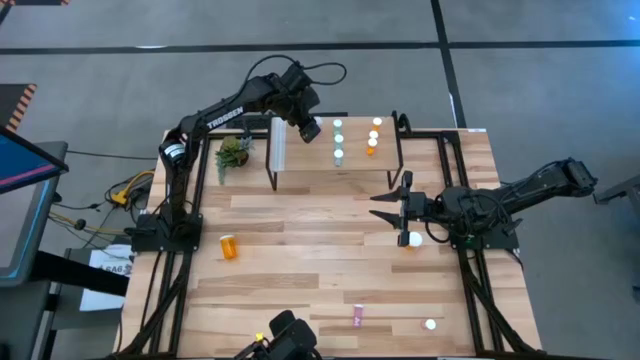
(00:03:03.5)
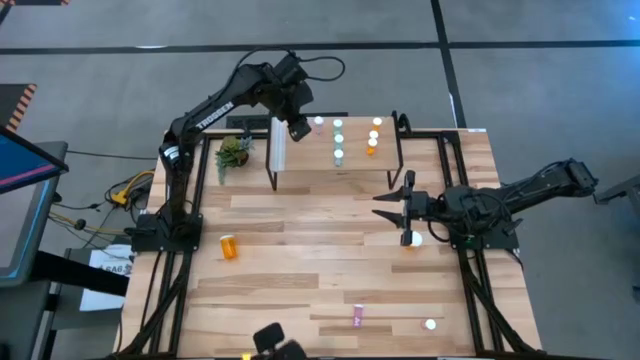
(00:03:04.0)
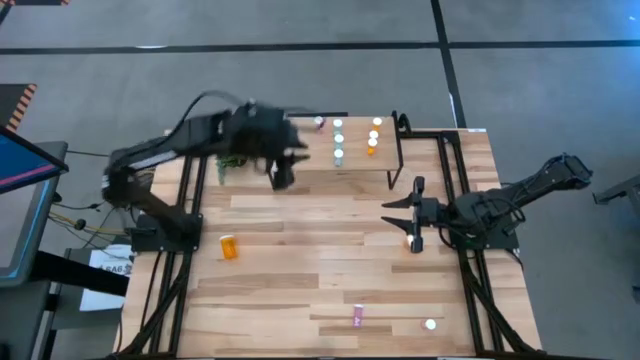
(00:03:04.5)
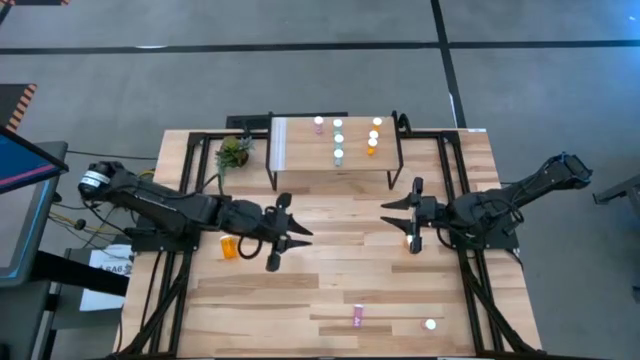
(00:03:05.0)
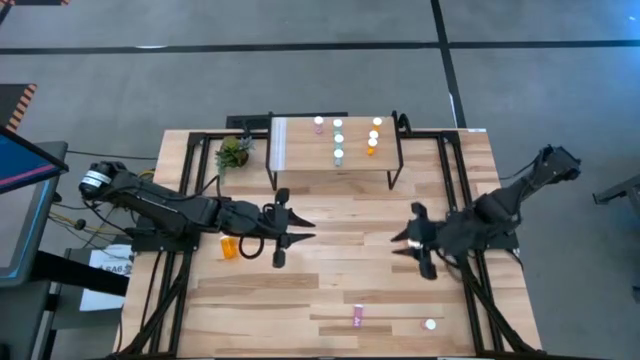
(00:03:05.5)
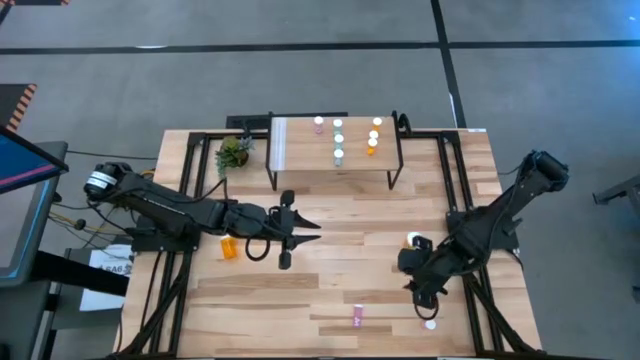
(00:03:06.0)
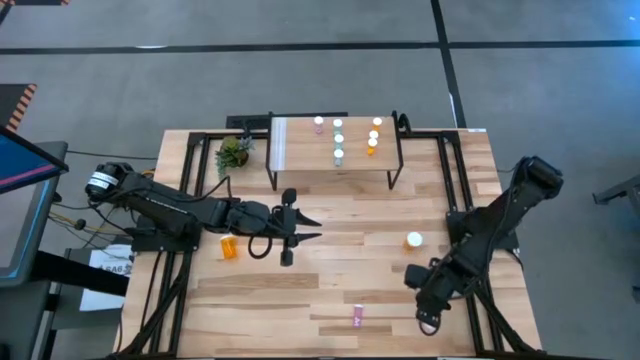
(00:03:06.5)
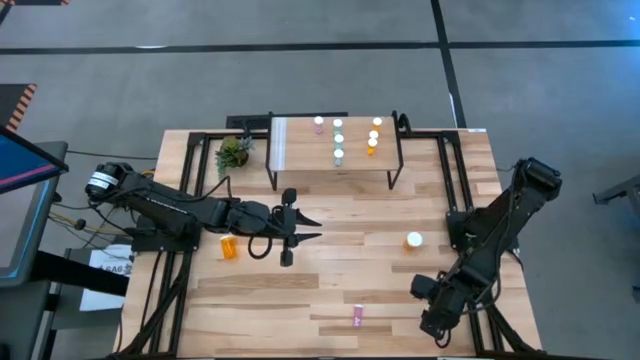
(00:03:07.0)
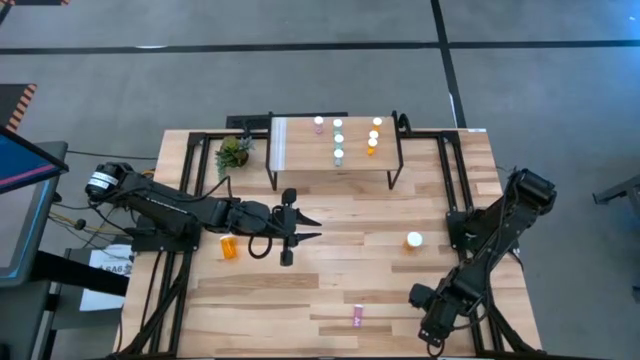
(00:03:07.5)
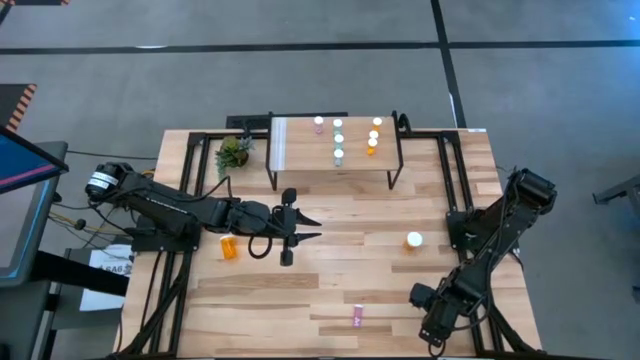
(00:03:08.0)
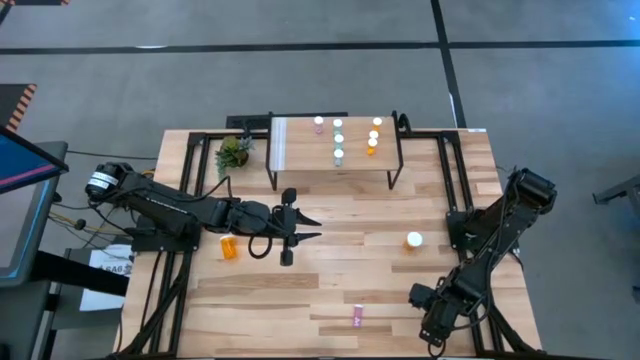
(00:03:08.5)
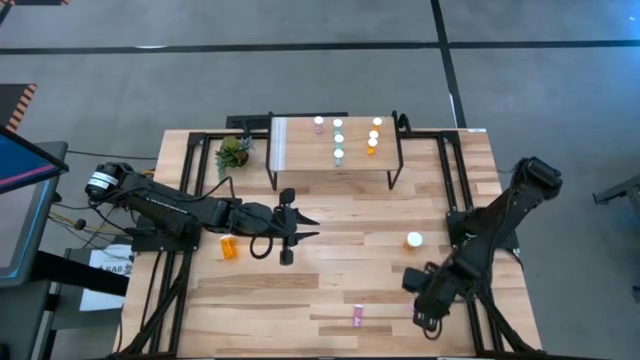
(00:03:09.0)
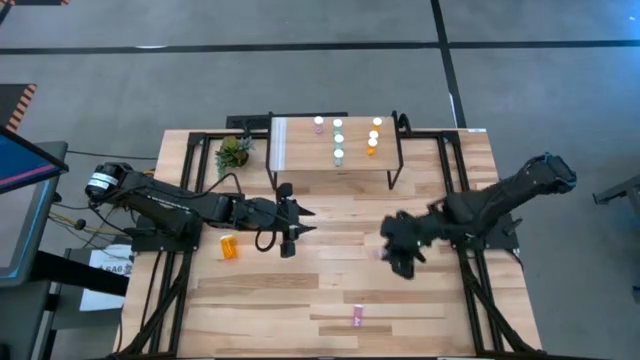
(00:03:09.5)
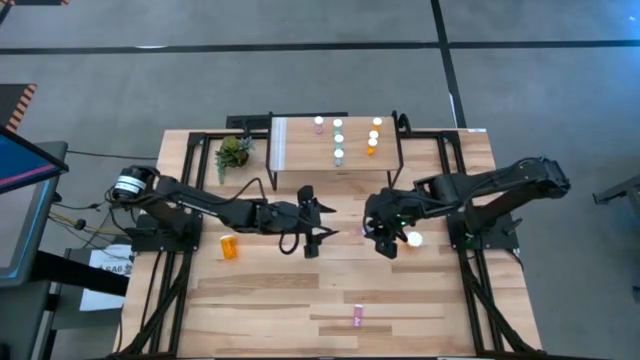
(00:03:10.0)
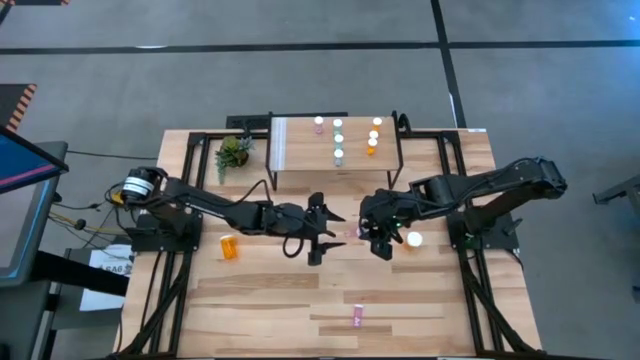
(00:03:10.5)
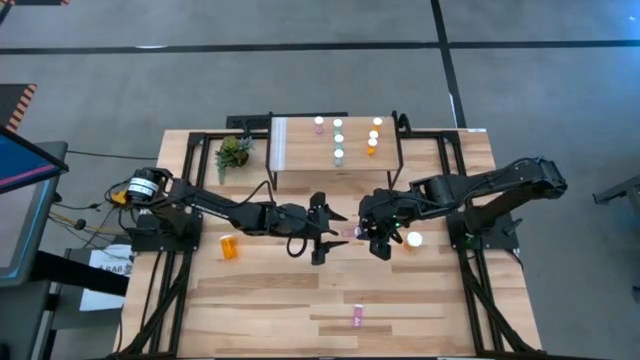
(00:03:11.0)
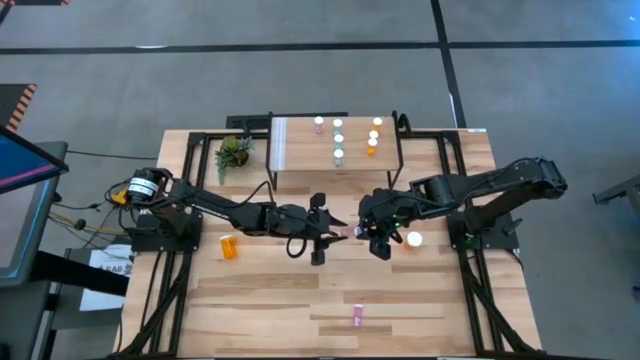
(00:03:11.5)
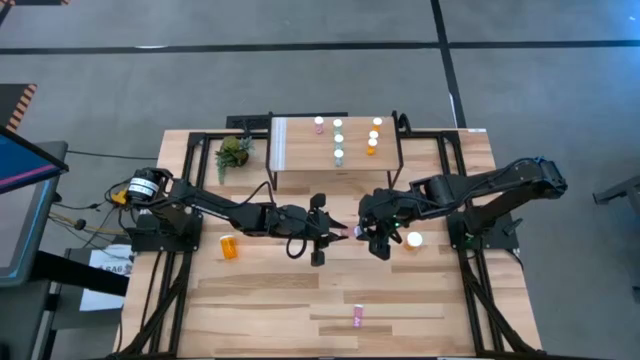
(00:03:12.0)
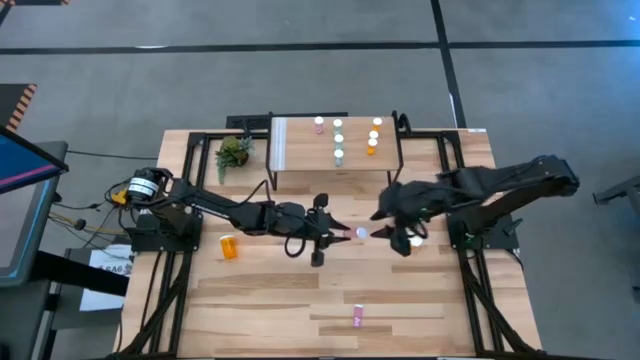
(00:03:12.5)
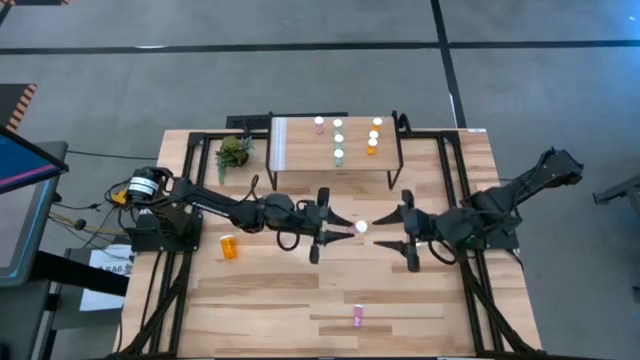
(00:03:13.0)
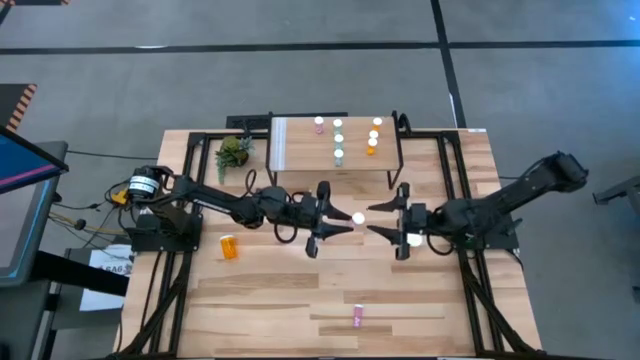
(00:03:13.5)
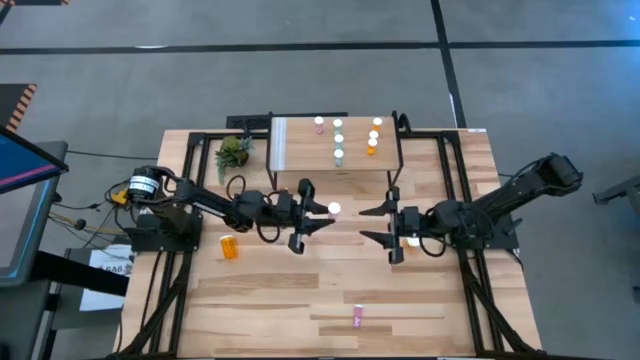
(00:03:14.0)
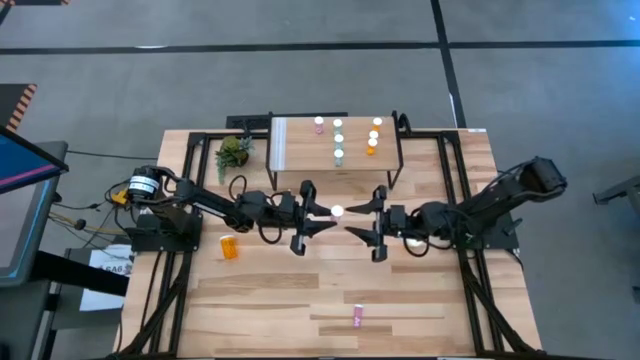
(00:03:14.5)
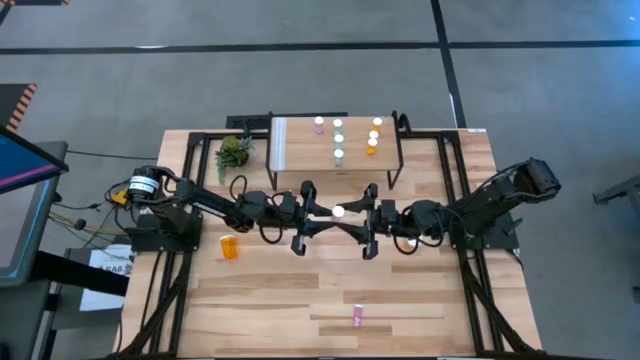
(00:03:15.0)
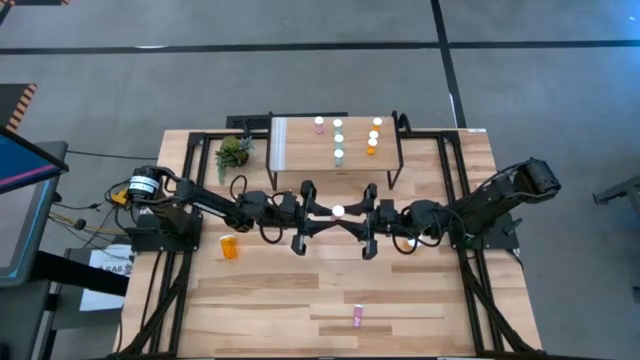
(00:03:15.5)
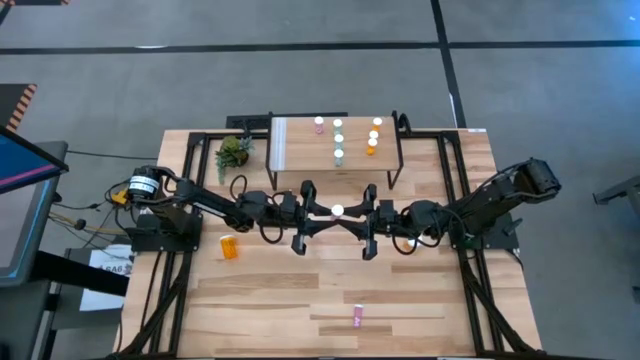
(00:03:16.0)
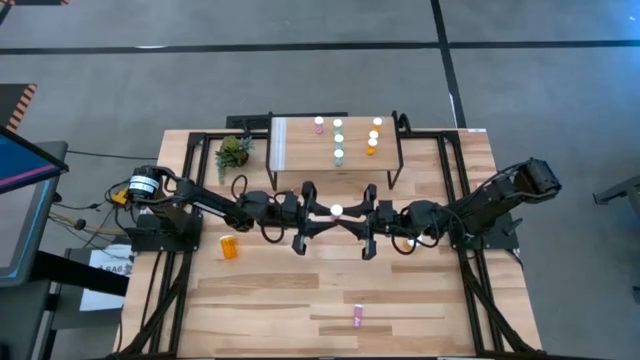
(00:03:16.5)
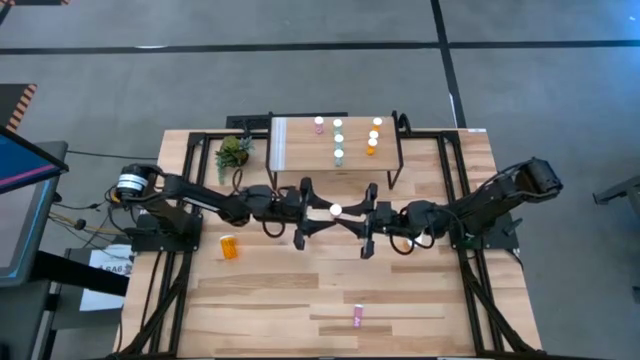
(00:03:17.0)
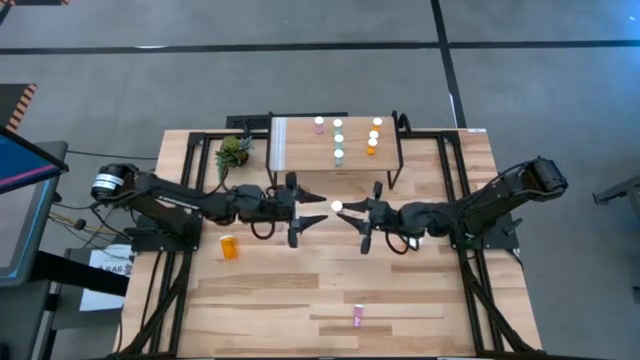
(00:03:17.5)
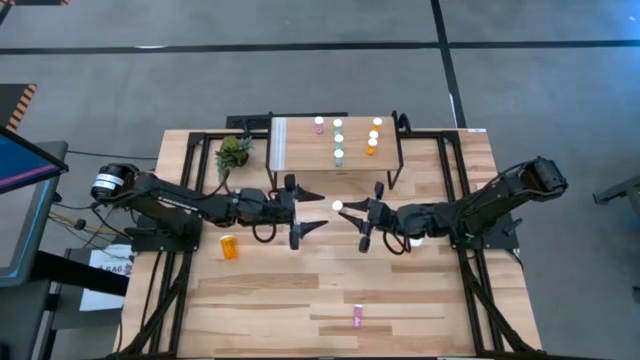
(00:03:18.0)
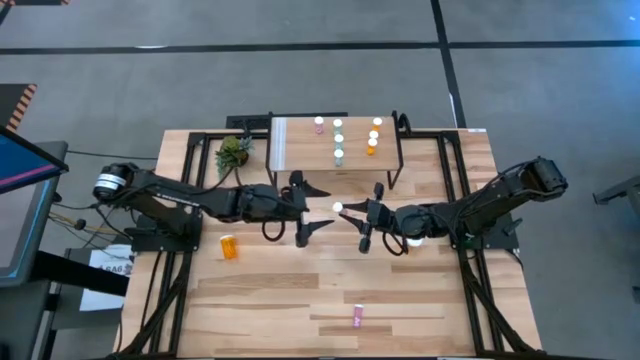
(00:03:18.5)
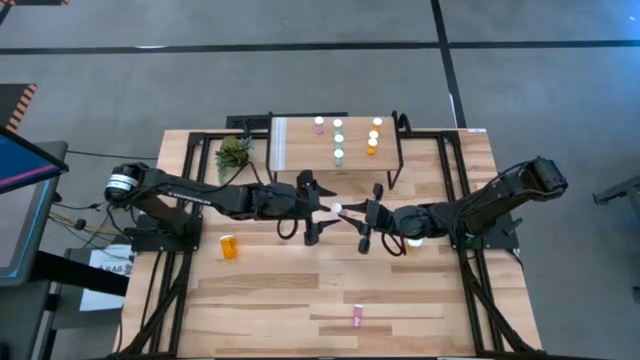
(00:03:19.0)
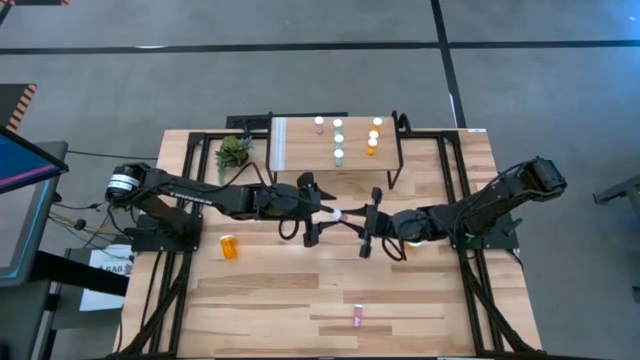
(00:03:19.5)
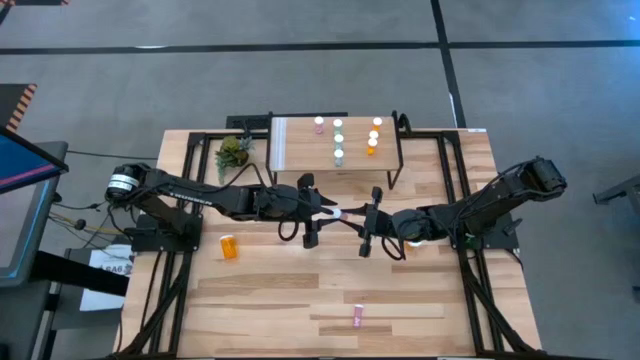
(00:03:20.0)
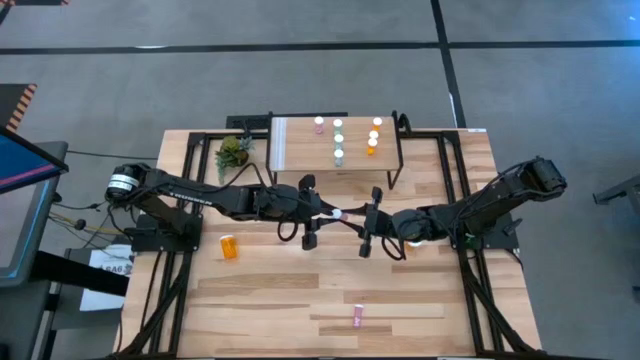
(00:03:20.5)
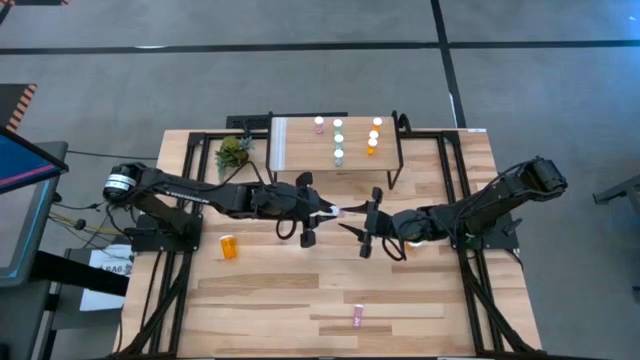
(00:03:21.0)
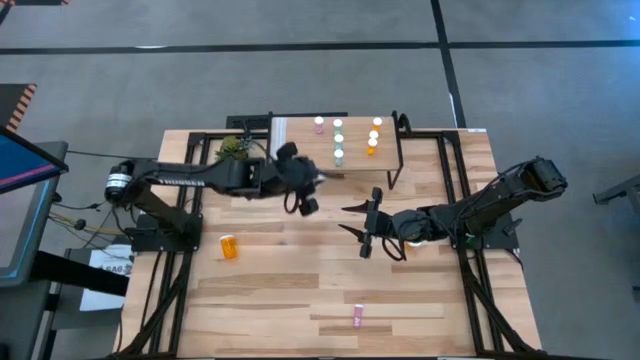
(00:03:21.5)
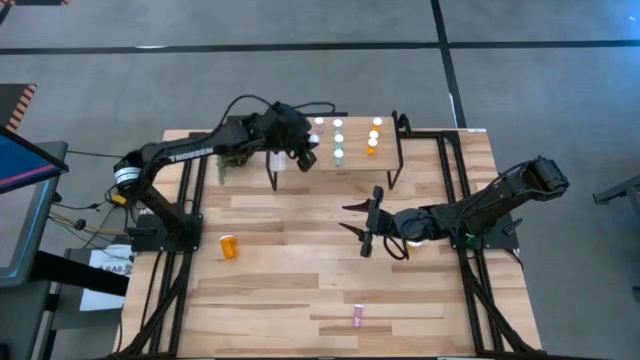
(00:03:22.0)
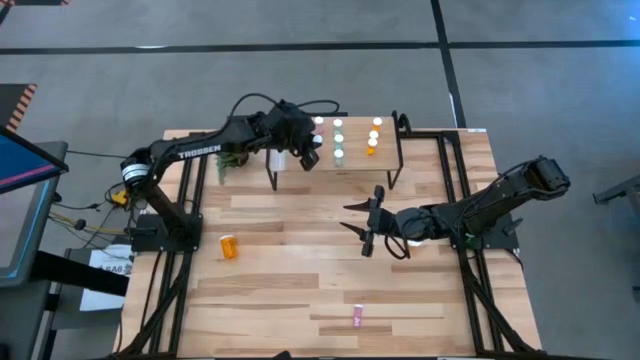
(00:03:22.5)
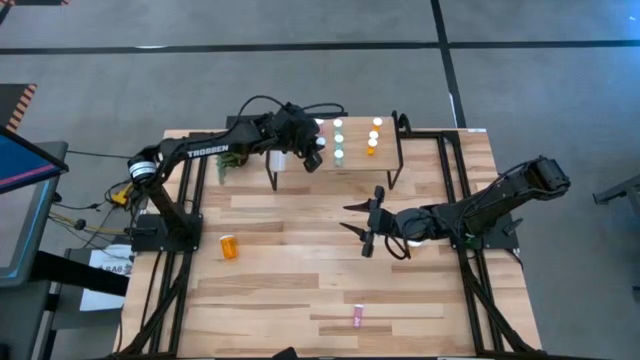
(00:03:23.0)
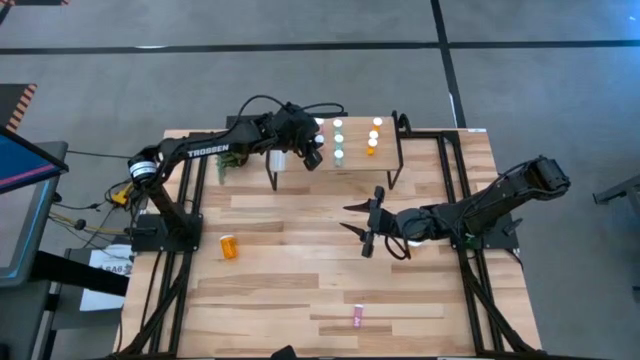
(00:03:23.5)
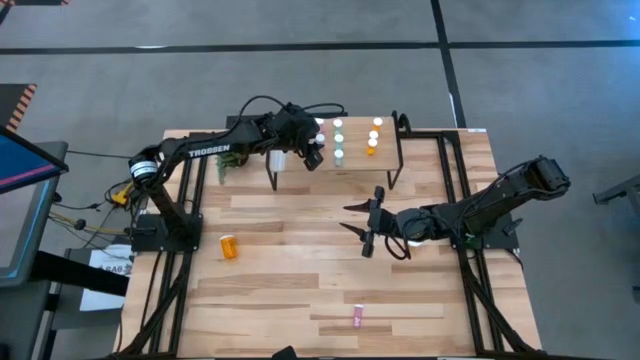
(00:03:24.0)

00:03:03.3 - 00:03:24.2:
Task: Pick and place medicine bottles onto shelf by color
Put the right pink pill bottle on the shelf aligned with the other pink pill bottle

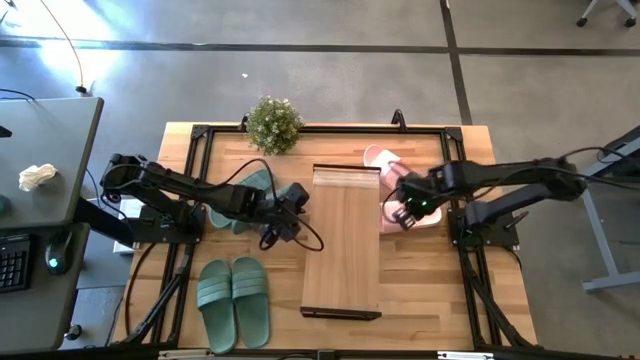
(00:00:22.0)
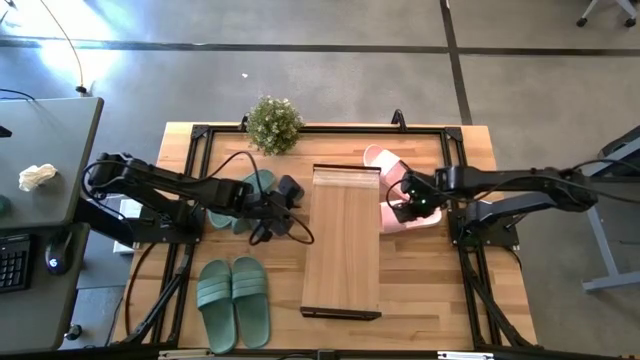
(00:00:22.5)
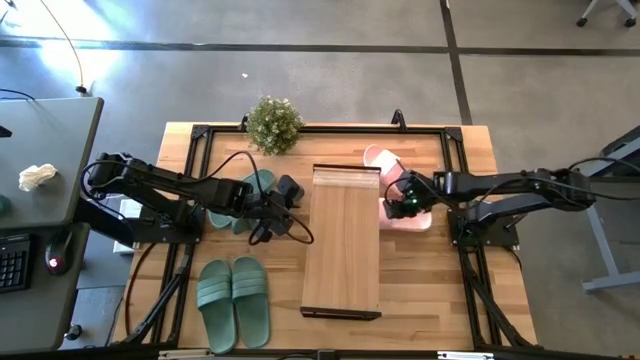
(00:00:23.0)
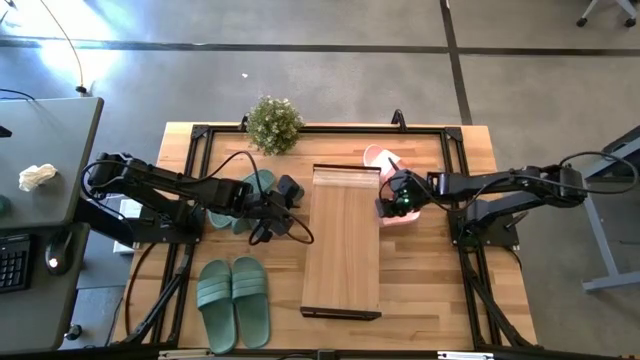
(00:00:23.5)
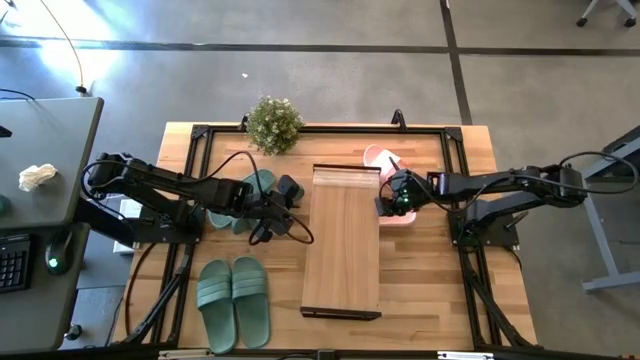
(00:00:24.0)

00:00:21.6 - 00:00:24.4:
Task: Pick and place slides into the shelf
Adjust the pink slipper
